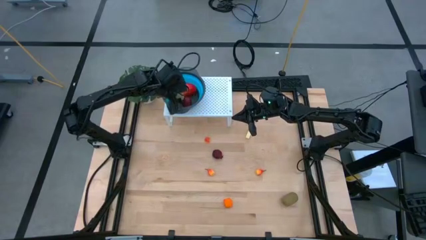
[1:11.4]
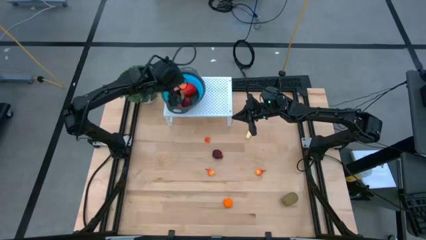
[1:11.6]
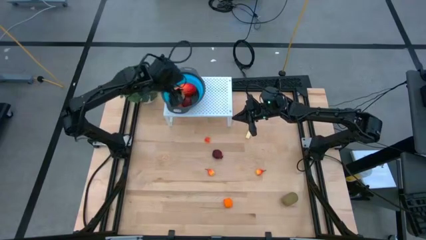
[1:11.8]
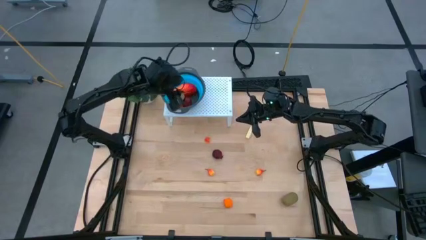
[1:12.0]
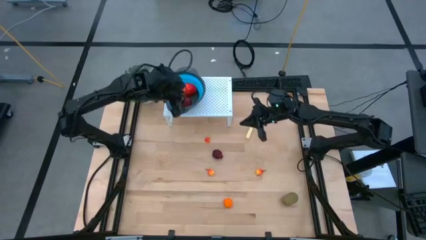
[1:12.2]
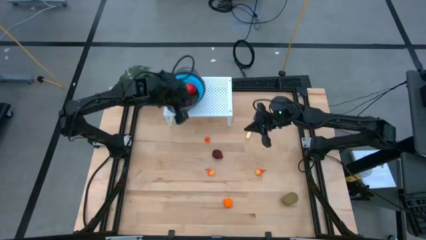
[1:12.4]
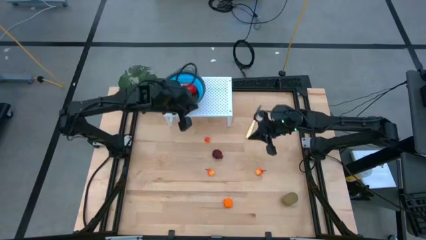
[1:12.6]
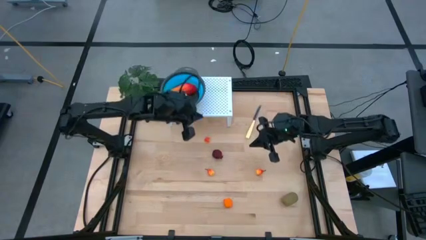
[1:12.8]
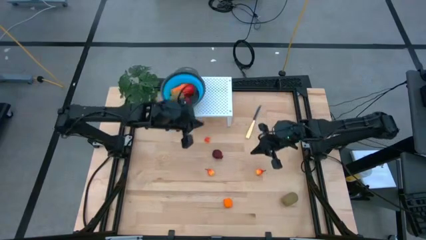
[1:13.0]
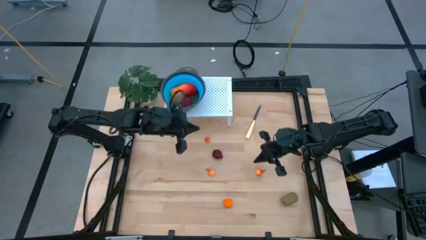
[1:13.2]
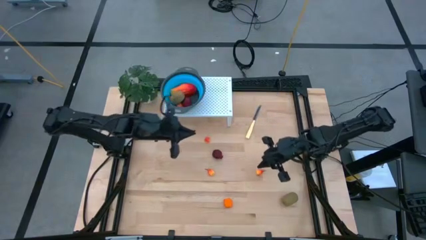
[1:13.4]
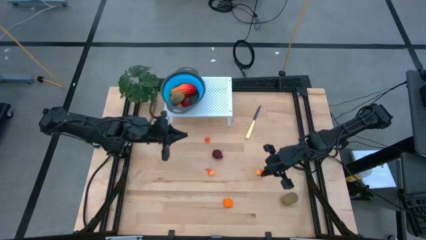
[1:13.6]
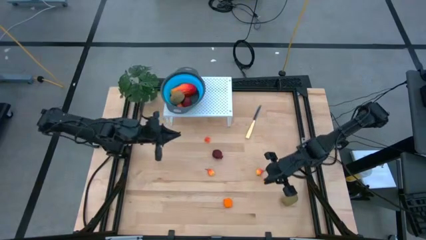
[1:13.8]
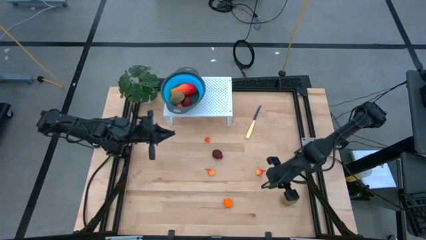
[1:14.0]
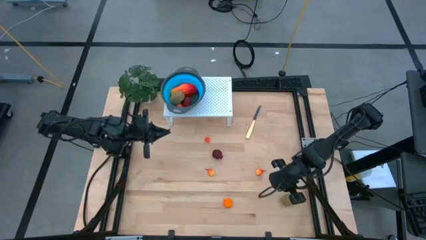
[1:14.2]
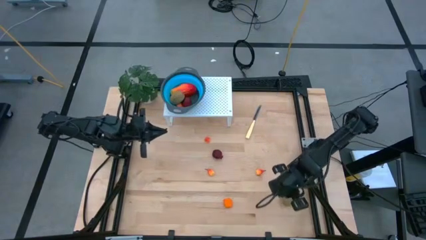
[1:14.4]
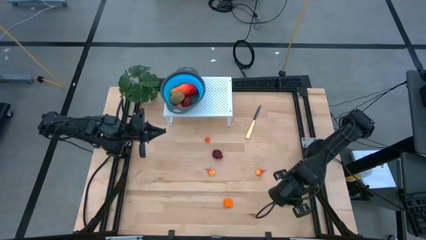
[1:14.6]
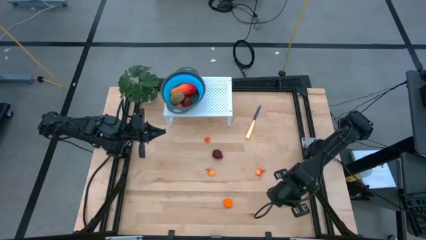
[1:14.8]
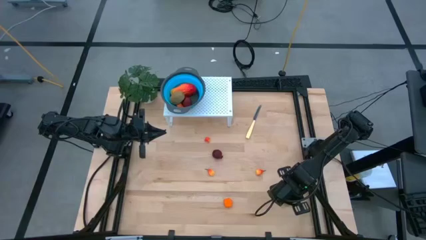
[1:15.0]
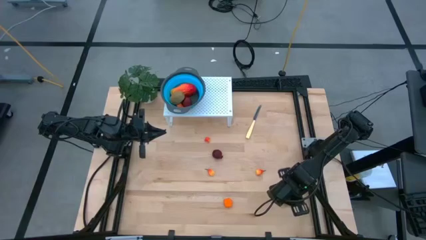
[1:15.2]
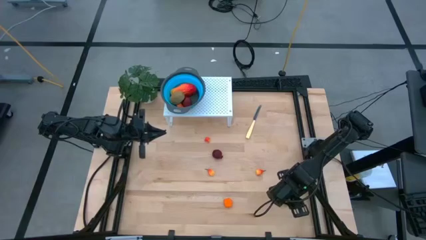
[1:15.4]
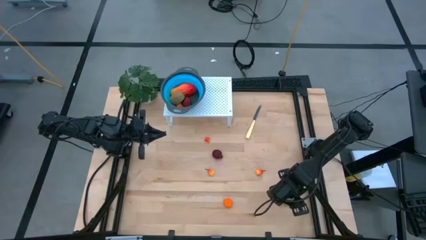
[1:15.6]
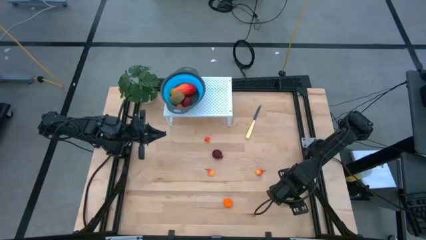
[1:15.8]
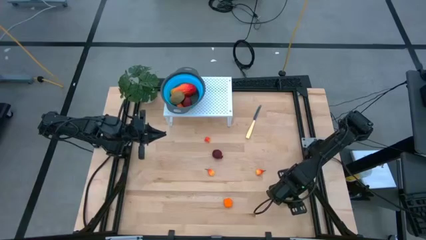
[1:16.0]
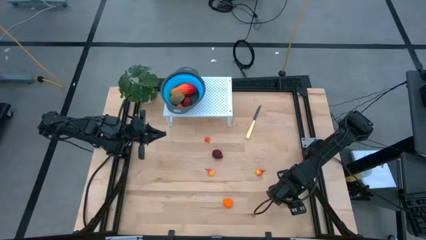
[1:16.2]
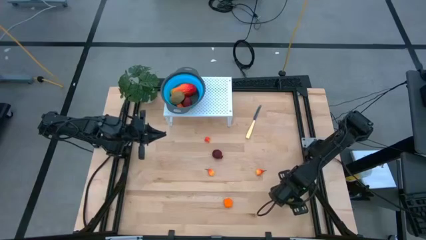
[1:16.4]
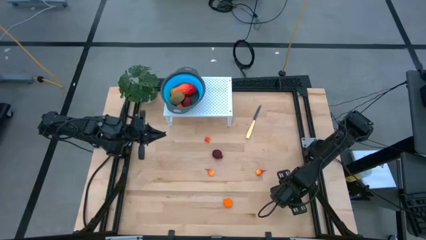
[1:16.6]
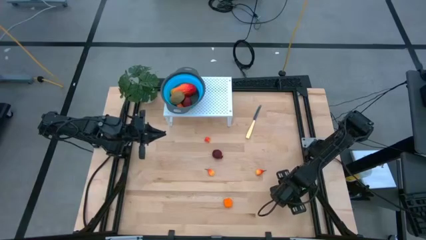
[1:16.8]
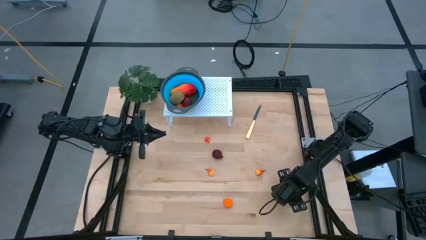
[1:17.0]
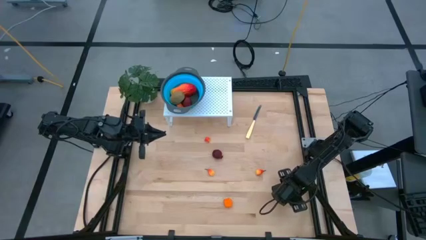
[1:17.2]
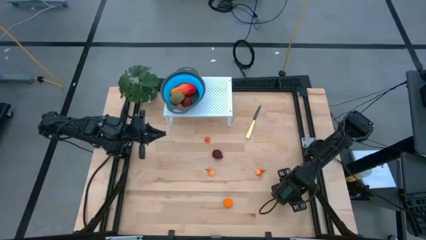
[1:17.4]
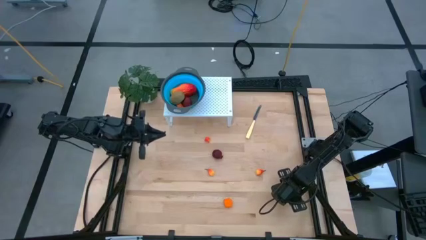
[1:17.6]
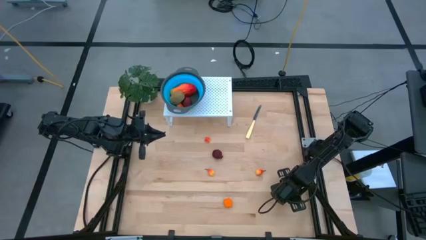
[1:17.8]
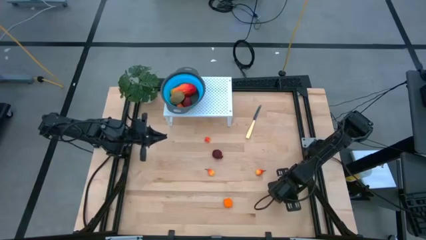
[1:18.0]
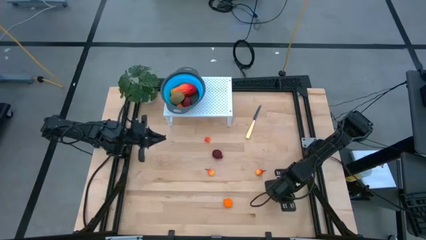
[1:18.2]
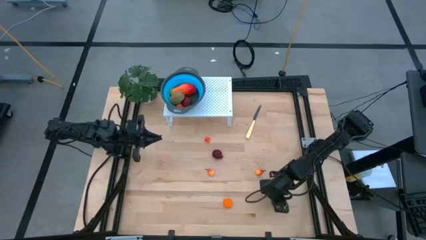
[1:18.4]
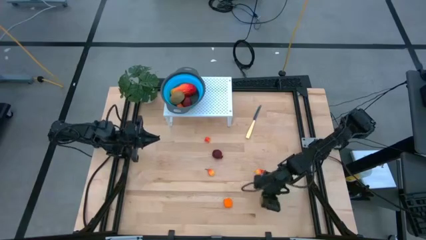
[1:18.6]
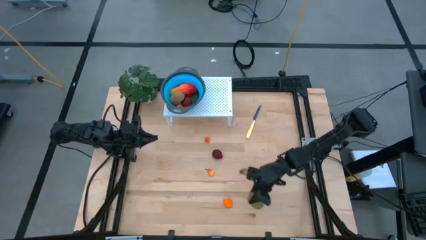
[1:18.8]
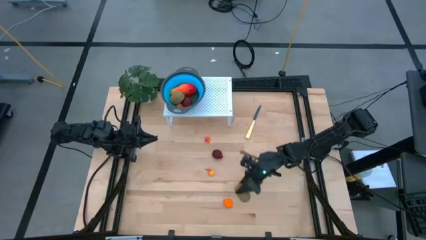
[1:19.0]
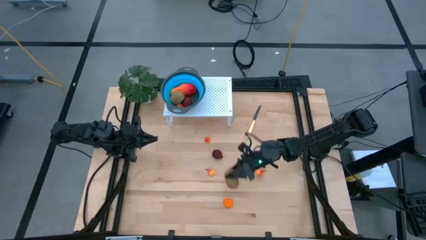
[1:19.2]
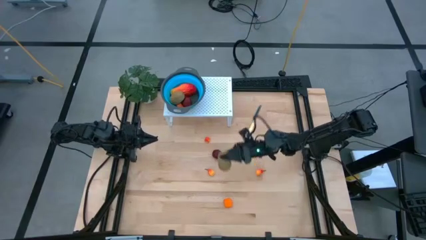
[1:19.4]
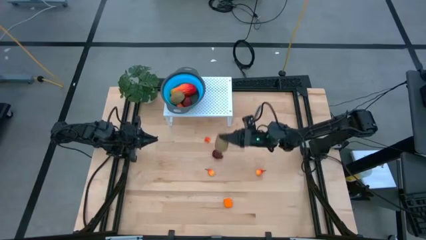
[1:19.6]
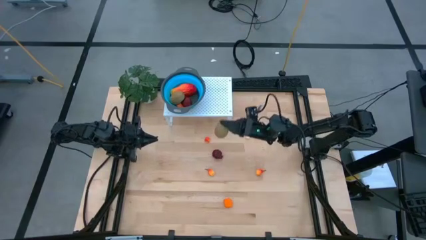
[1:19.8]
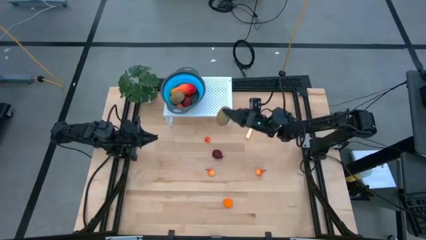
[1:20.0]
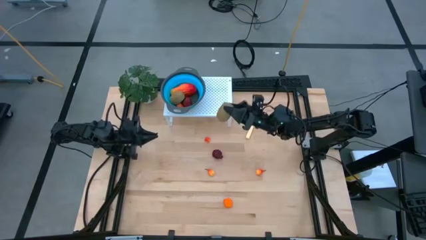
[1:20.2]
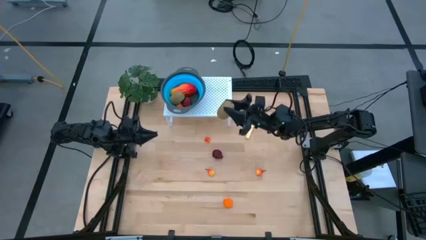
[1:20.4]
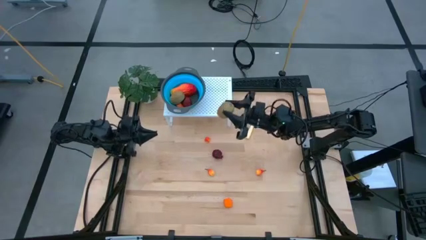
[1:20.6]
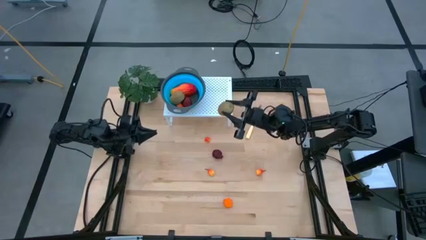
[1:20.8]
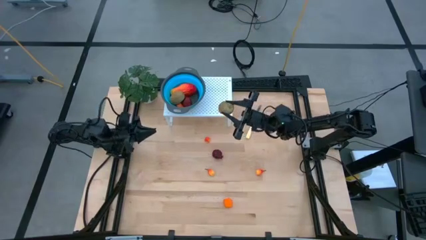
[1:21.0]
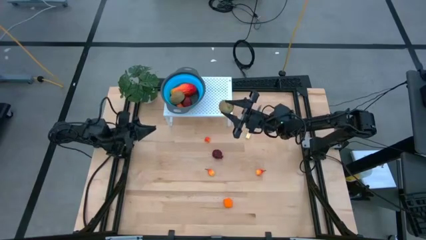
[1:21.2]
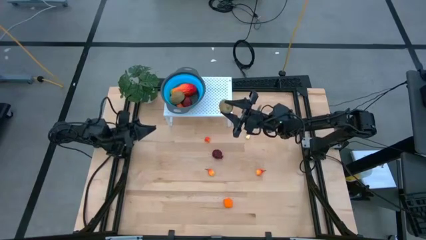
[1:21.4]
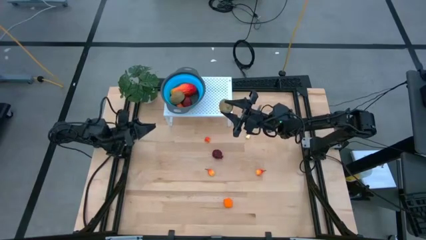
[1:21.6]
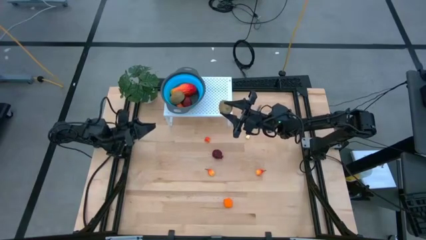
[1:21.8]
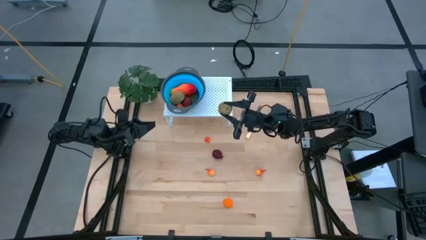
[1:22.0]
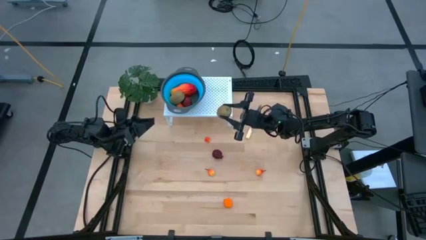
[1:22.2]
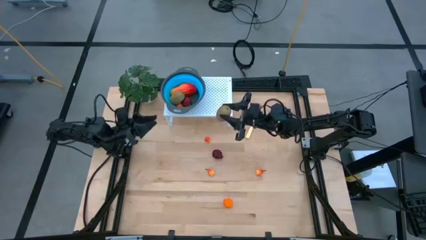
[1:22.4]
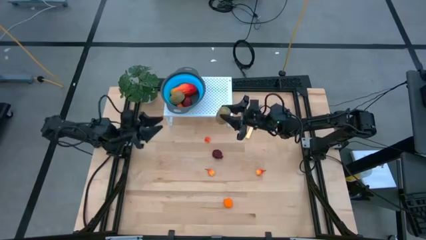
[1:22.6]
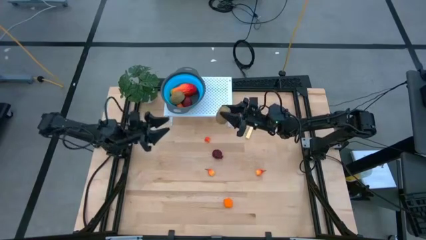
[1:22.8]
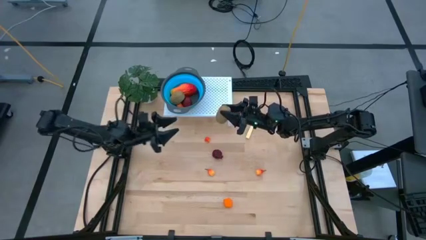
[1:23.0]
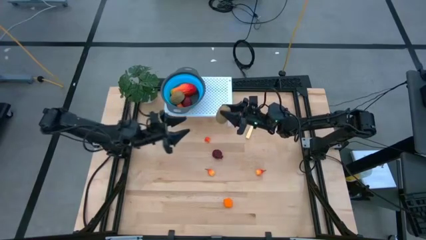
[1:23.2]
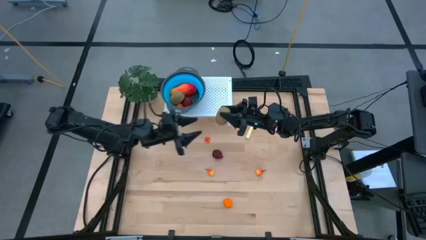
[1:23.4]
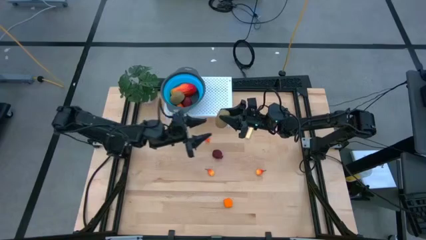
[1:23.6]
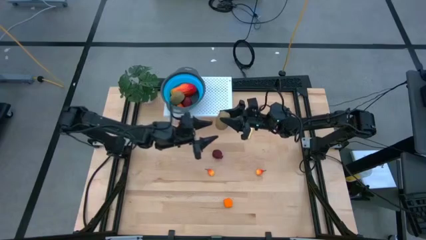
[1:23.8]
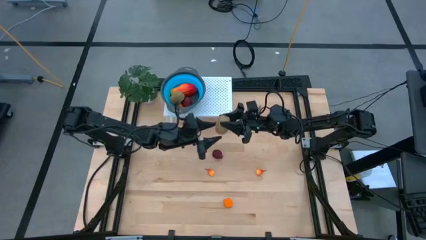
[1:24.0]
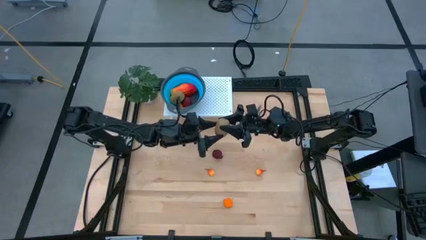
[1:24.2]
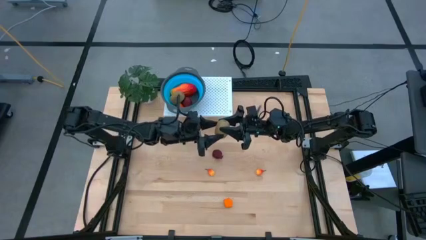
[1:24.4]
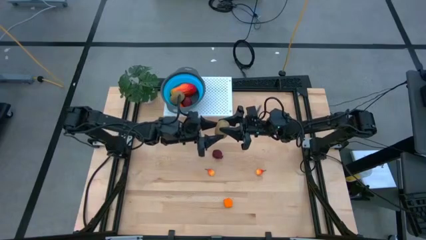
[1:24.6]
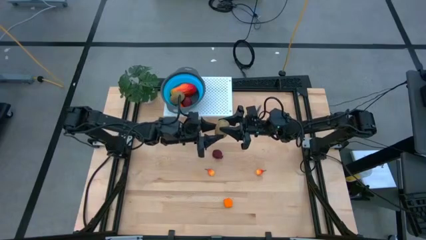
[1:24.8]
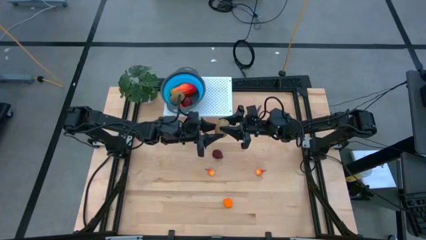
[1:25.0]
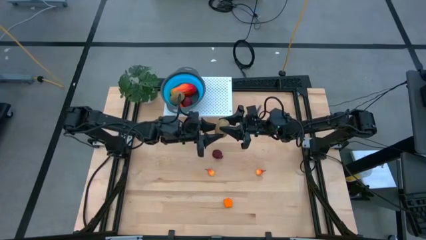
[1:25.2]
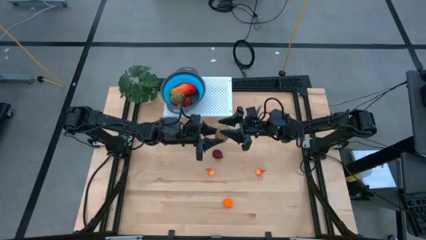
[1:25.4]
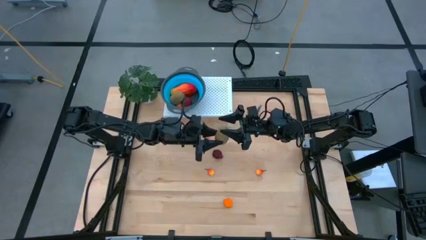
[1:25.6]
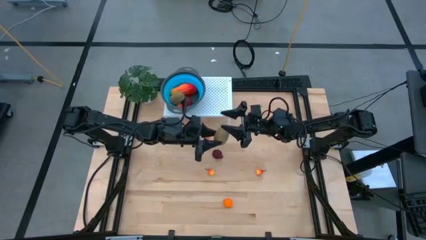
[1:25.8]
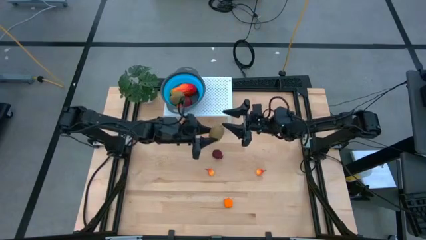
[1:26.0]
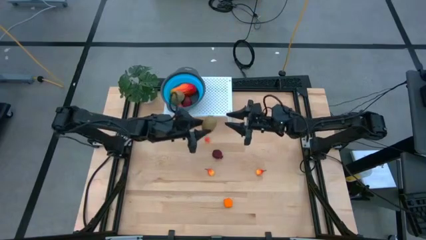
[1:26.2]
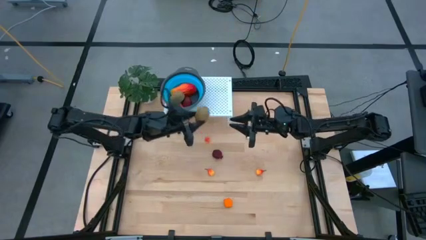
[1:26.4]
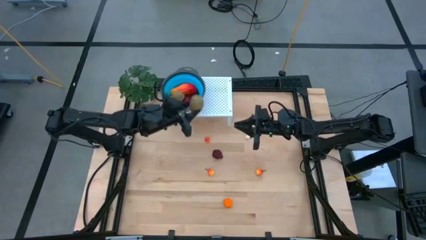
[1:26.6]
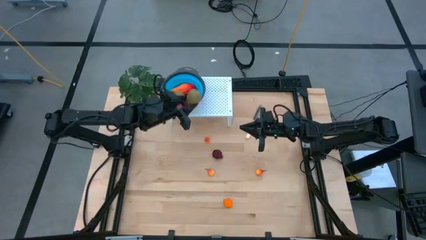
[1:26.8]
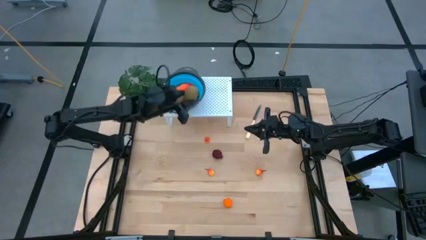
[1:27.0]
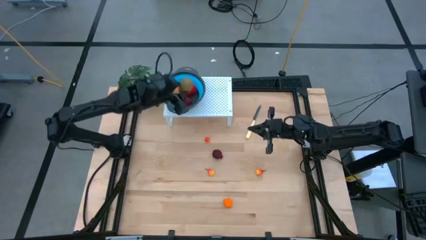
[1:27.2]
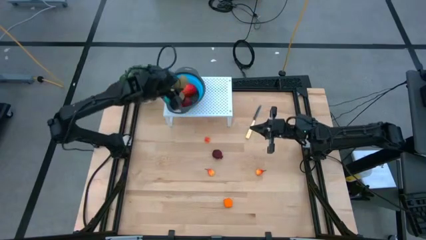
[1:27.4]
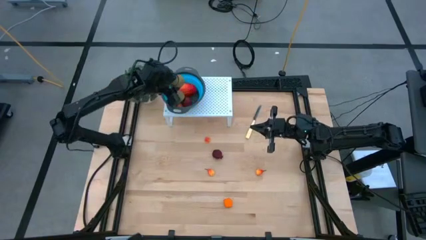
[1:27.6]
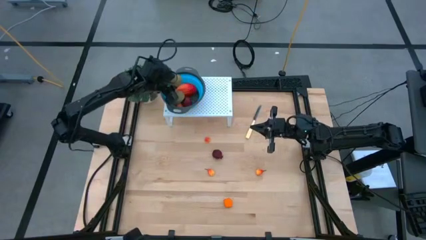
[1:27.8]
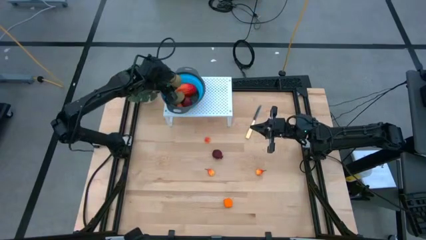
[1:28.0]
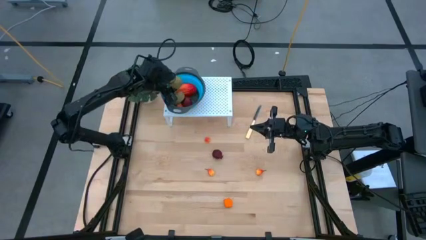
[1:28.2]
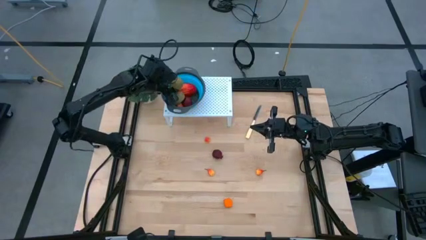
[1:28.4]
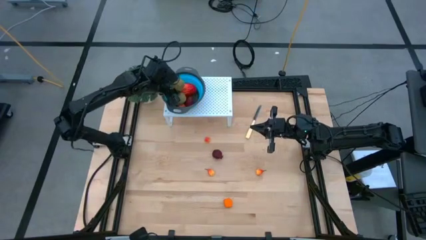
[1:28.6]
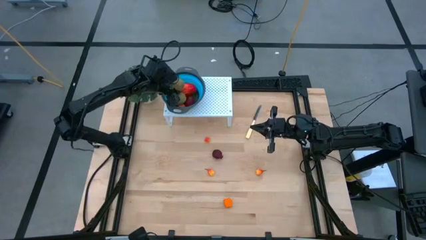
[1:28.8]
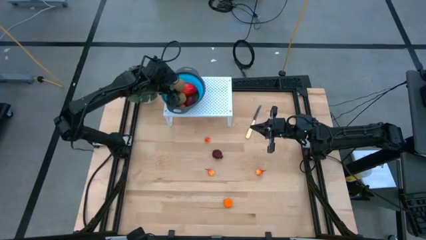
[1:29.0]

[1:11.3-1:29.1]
Task: Pick & Place Fruit
Put the kiwi into the strainer bowl on the shelf
